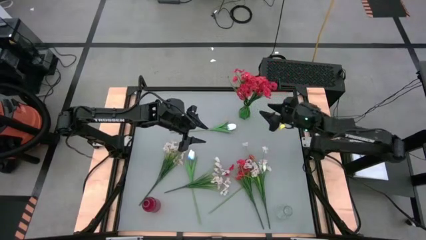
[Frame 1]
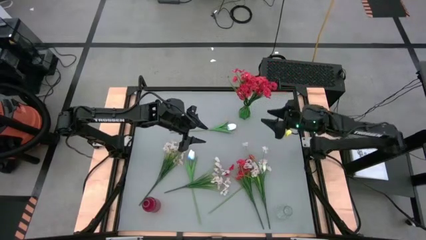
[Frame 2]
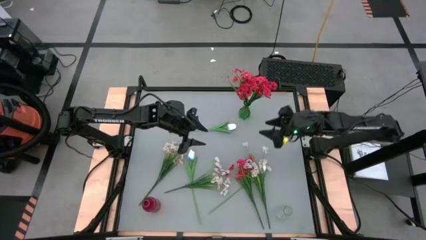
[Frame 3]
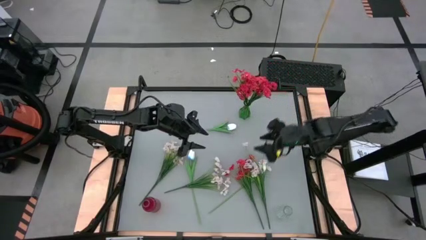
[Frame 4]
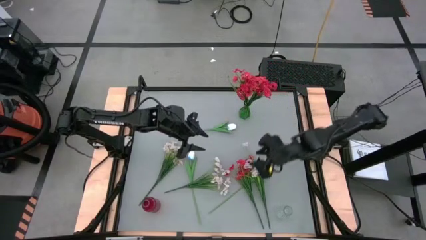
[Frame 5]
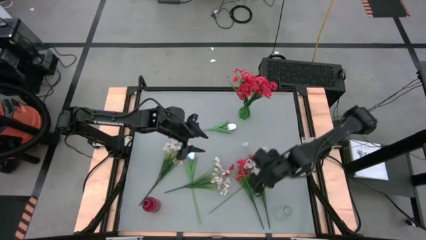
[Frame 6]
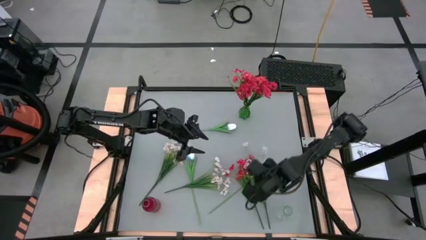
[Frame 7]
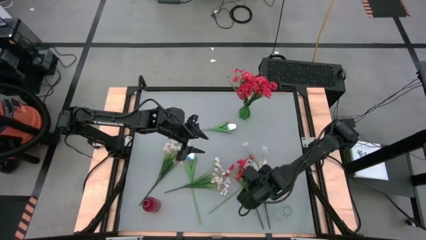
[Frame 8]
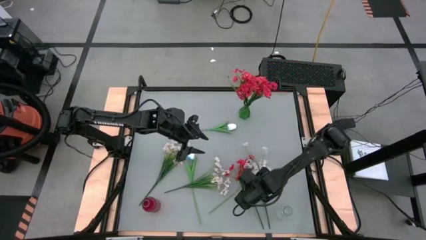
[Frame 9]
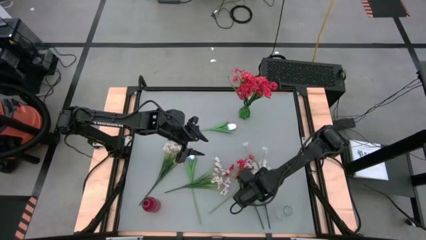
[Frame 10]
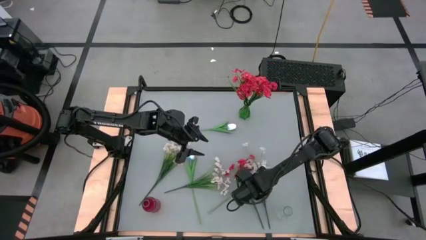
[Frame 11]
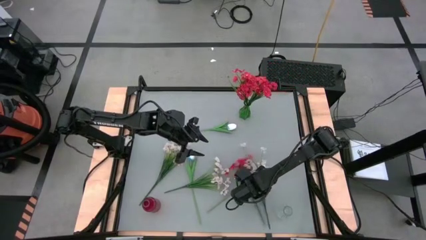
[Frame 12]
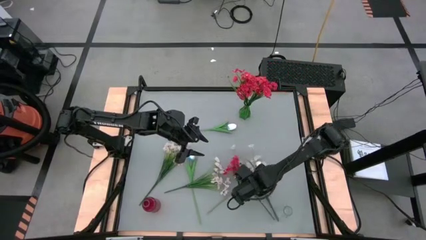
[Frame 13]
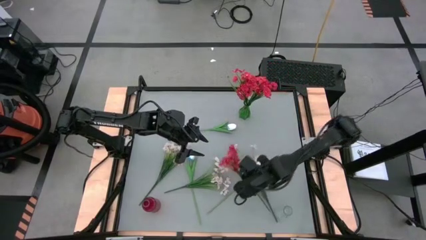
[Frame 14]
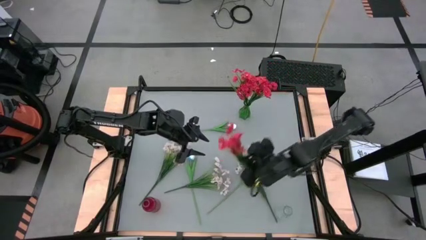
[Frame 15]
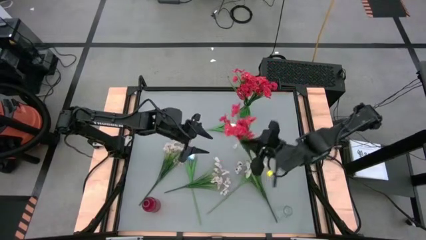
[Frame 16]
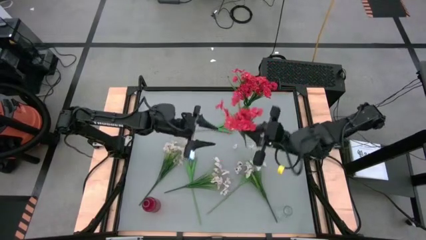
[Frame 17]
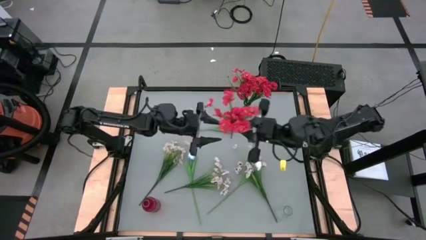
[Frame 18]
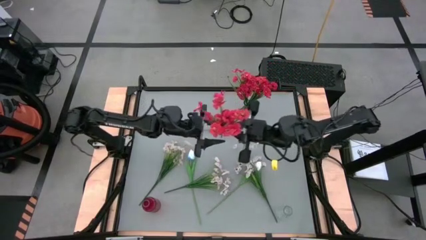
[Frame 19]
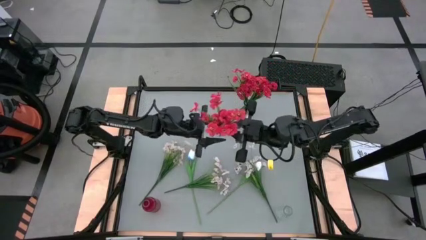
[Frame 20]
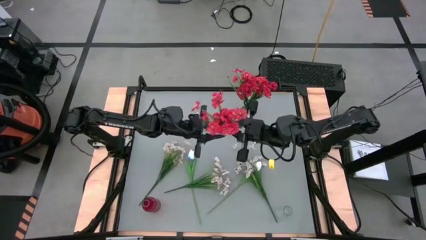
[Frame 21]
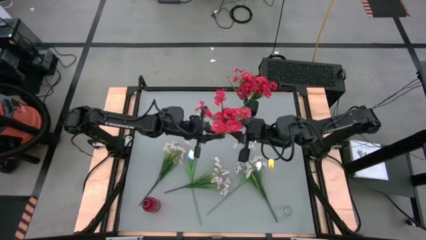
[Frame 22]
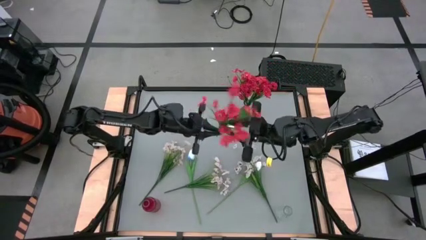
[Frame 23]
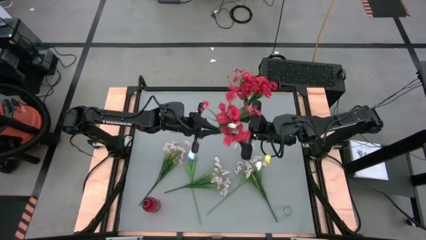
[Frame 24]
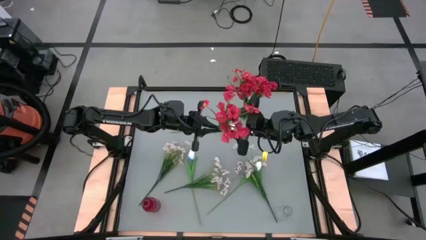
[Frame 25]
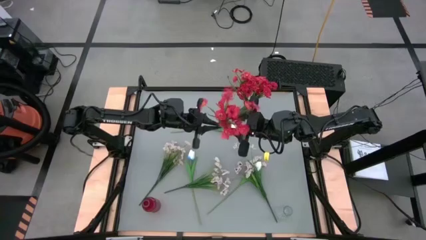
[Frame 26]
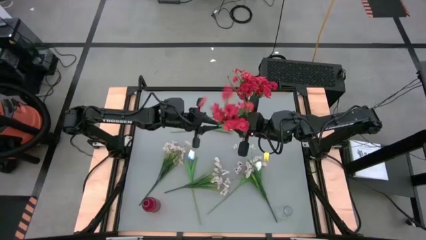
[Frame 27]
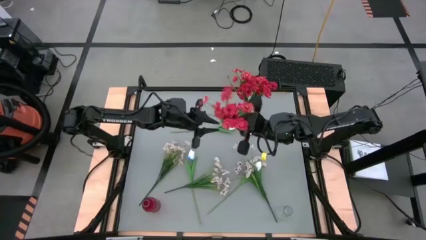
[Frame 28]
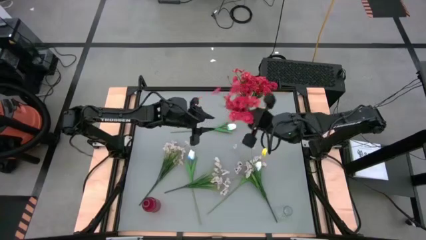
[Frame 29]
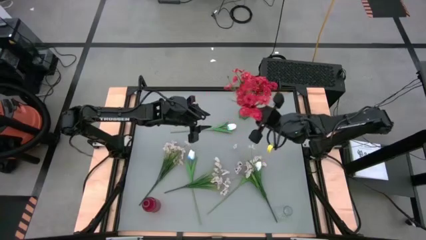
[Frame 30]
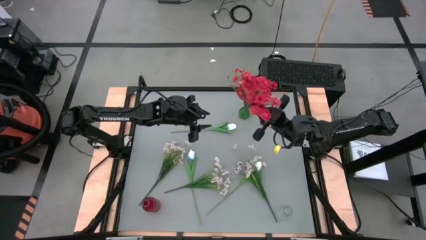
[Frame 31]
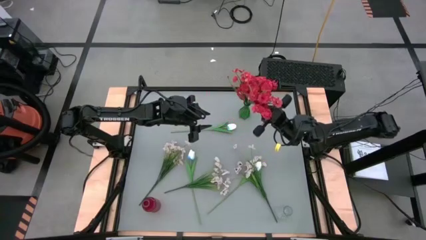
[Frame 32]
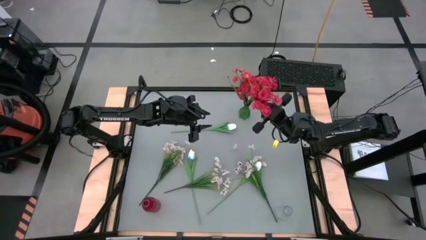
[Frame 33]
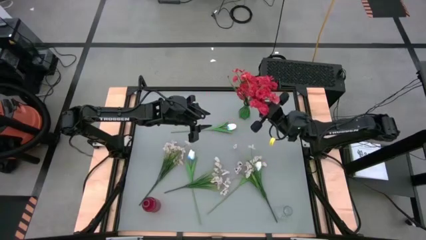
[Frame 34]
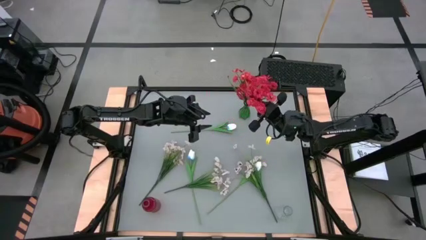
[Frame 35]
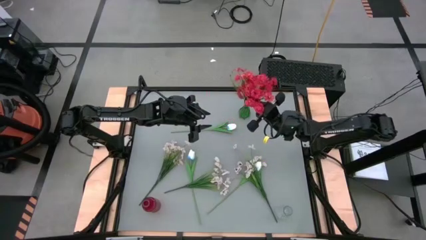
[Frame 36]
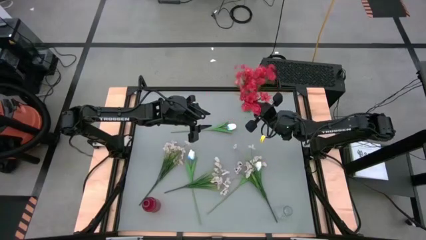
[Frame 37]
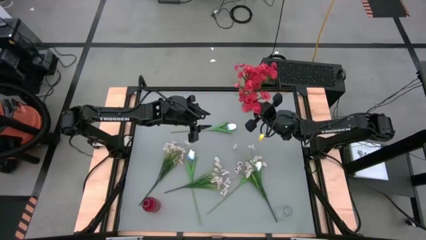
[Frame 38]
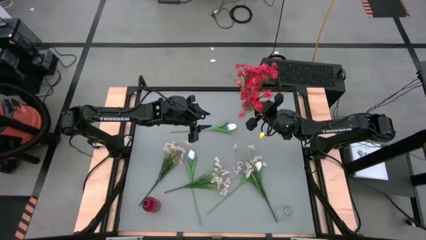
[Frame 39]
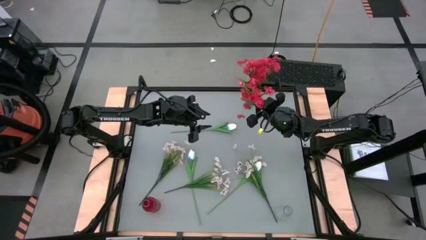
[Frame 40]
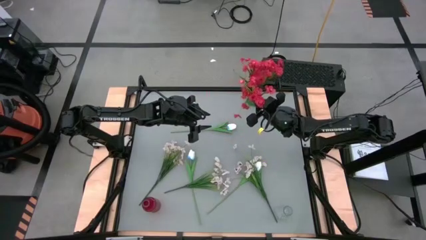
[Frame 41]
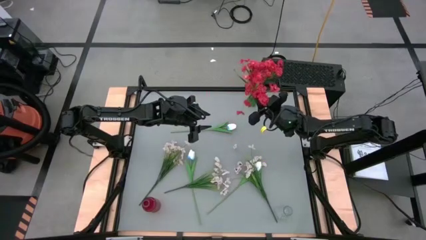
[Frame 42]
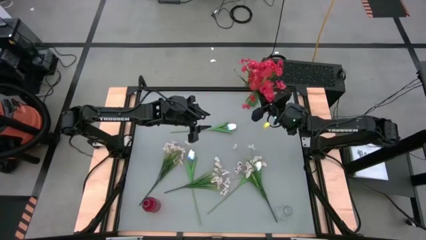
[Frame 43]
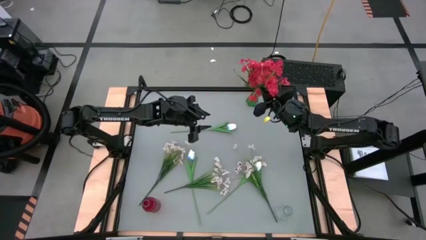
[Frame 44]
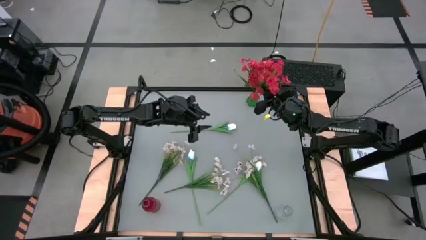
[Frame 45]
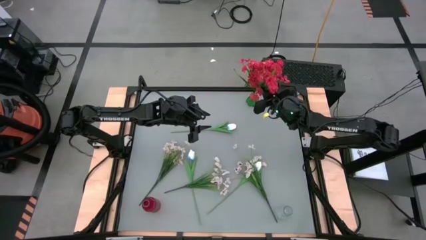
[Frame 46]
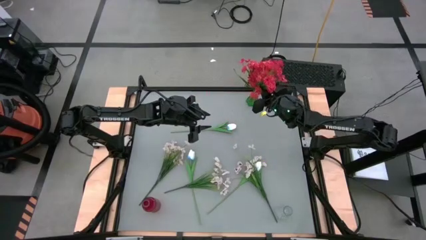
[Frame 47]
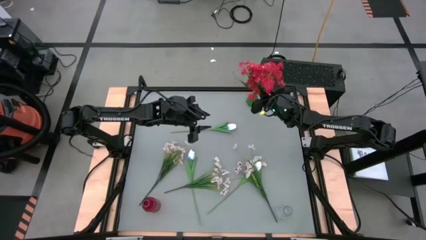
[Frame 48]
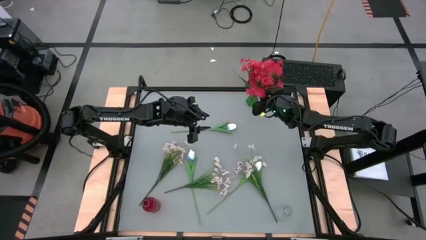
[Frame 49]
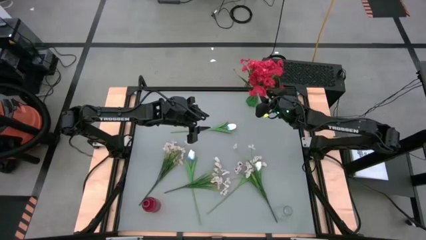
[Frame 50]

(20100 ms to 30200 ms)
Task: Sort flowers into vase by color
Put the red flowers into the green vase

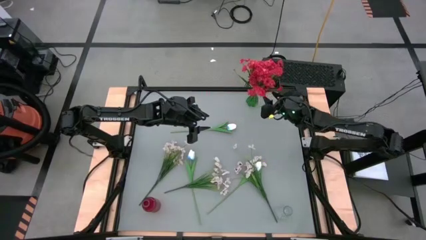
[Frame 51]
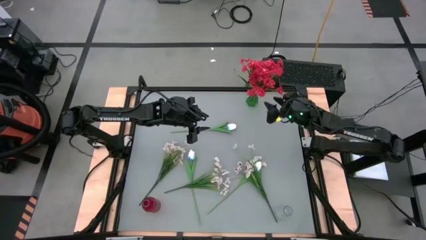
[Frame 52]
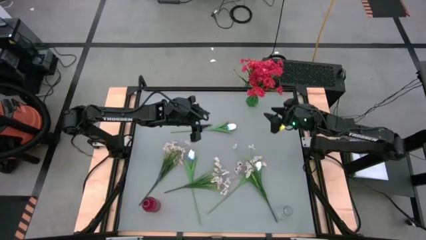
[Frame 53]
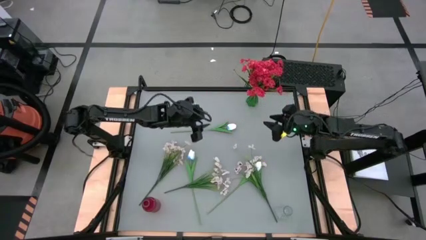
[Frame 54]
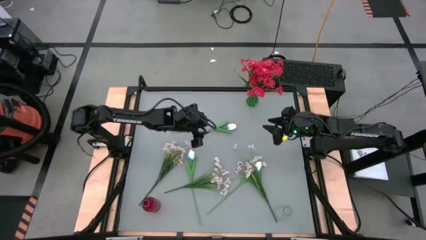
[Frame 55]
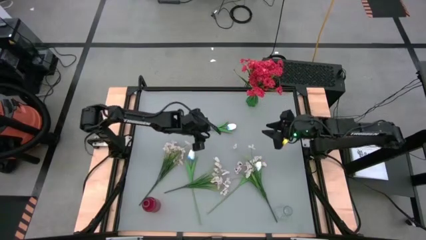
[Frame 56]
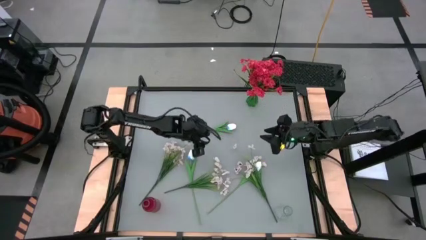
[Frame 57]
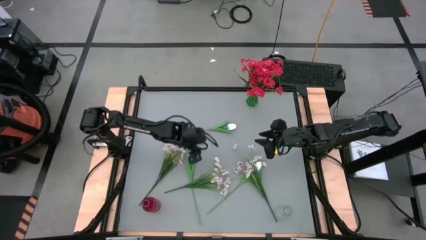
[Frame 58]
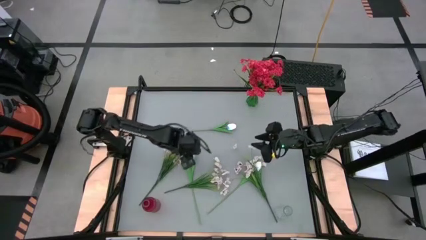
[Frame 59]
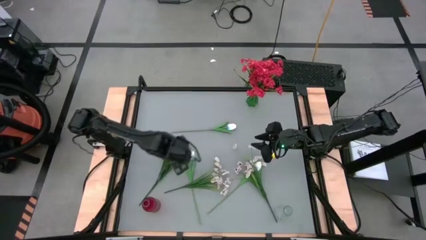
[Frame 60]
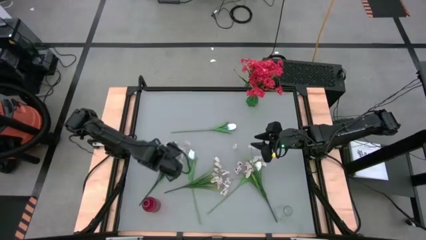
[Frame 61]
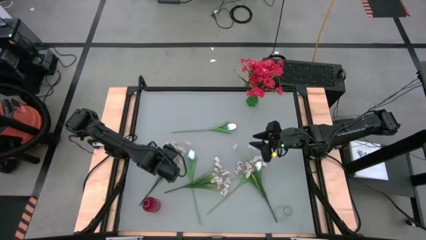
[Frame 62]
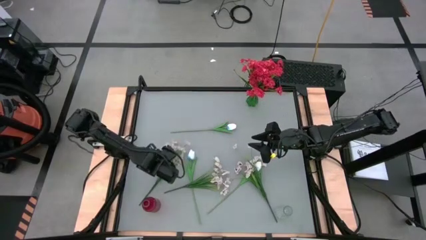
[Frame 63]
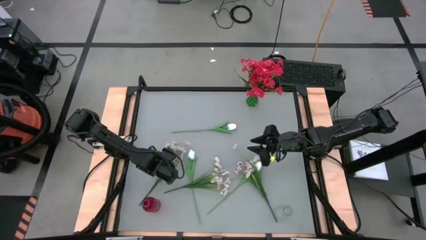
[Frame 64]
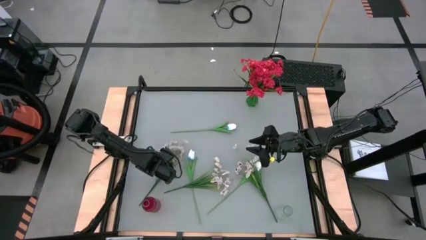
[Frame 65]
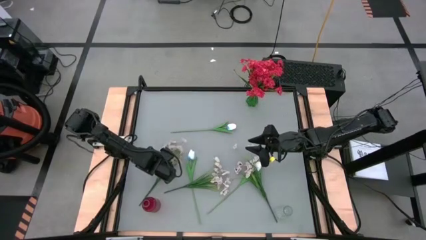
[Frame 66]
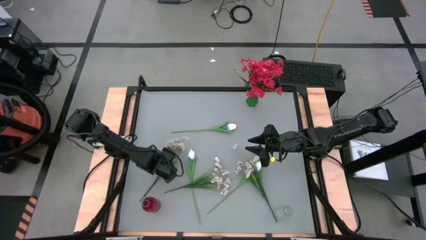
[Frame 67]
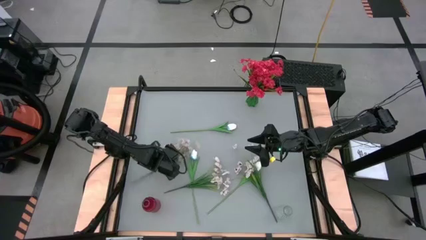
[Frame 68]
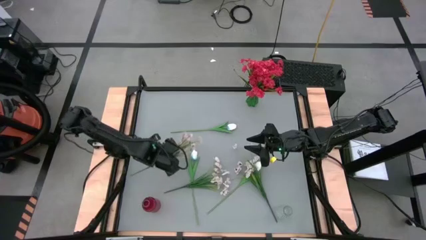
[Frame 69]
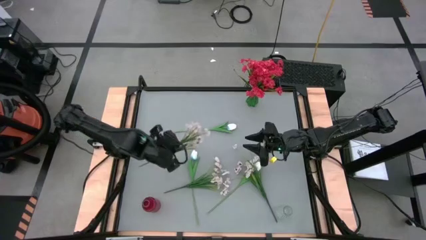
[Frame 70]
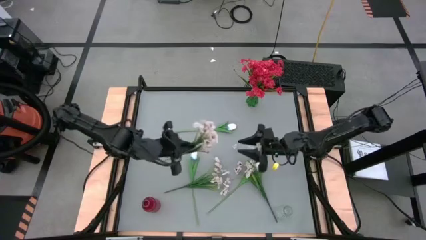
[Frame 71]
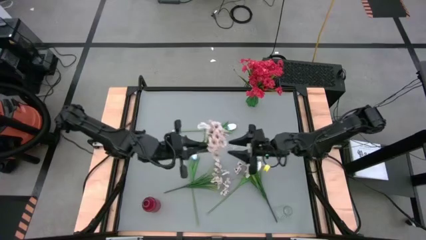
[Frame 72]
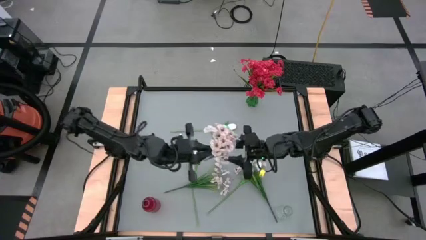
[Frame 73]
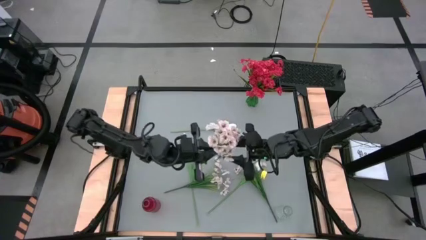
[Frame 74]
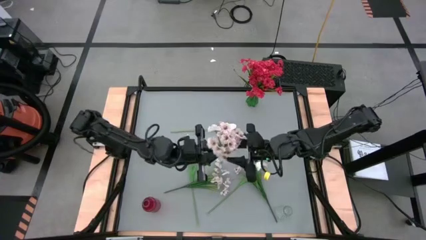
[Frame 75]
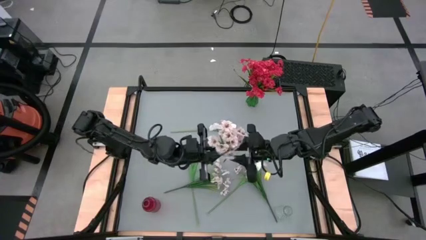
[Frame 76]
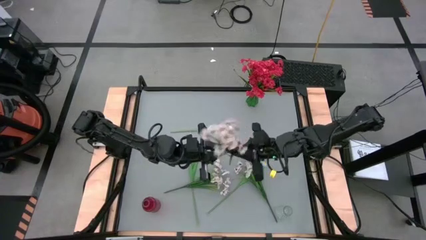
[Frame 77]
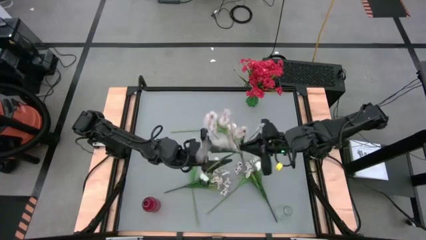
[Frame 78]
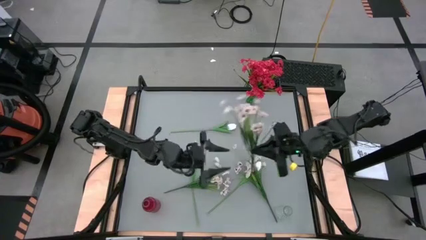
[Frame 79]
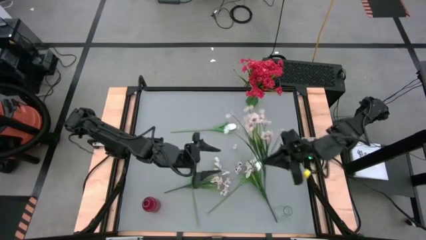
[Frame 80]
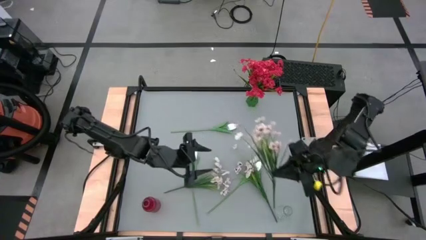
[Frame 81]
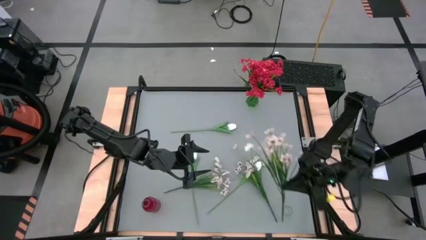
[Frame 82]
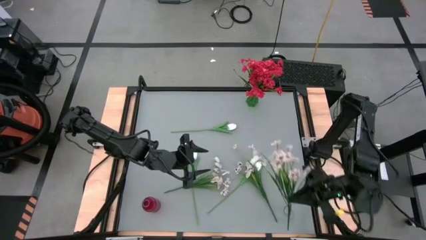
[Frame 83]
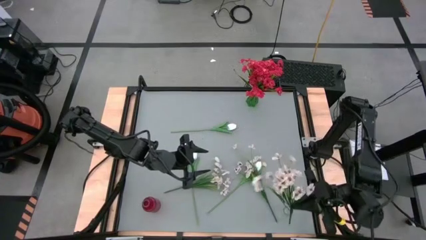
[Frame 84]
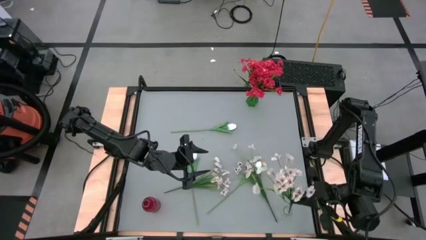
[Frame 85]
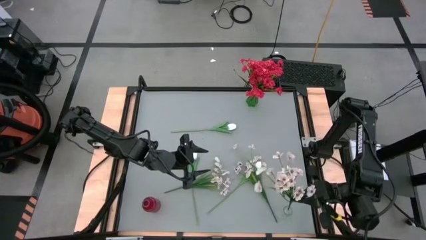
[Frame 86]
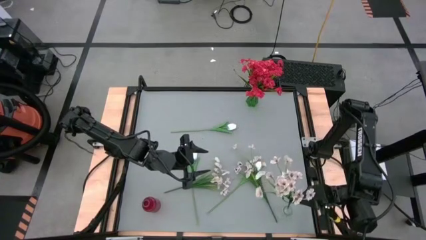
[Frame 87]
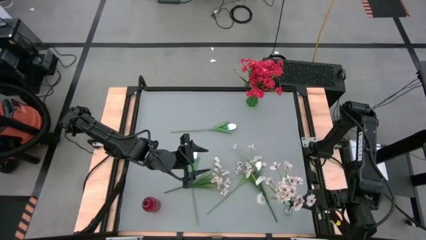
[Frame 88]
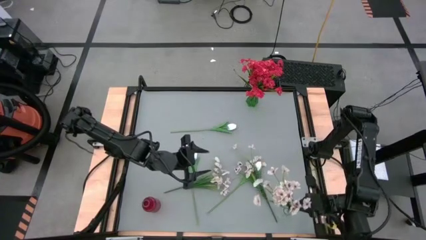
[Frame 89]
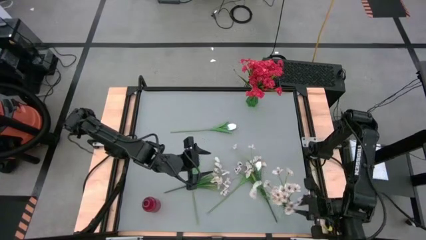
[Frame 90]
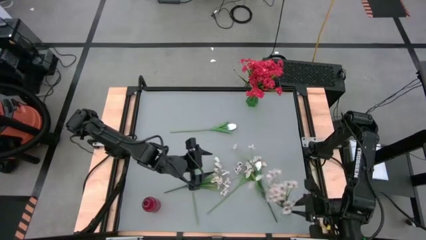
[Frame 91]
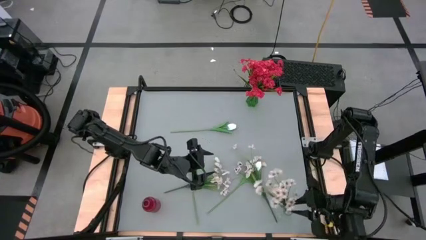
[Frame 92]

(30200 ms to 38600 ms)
Put the left white flowers into the transparent vase
